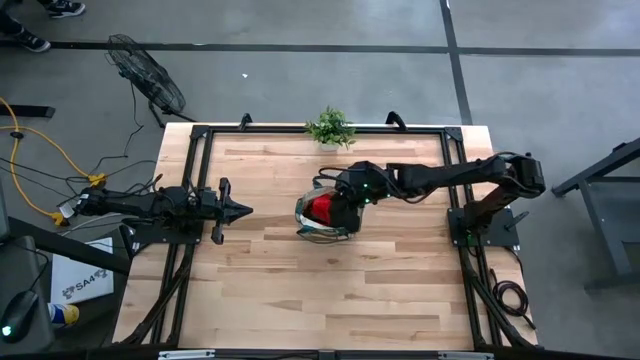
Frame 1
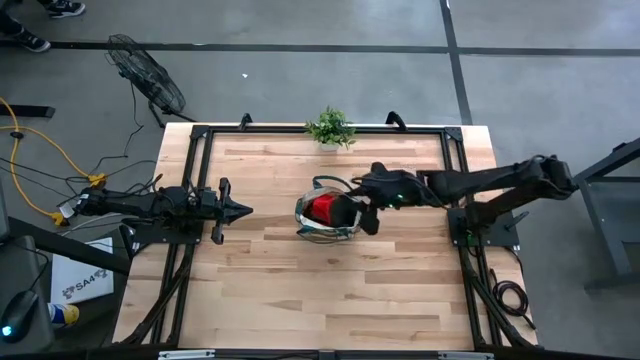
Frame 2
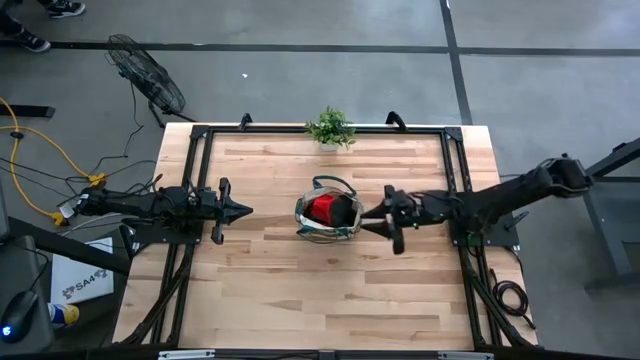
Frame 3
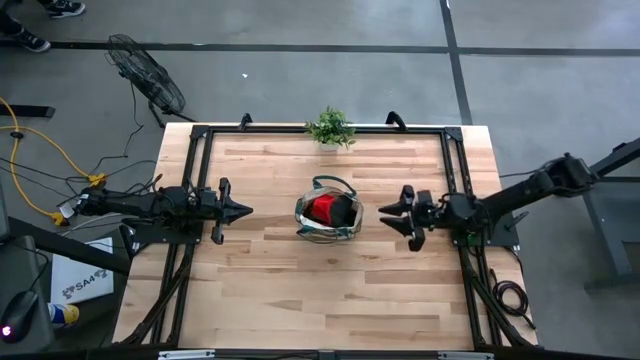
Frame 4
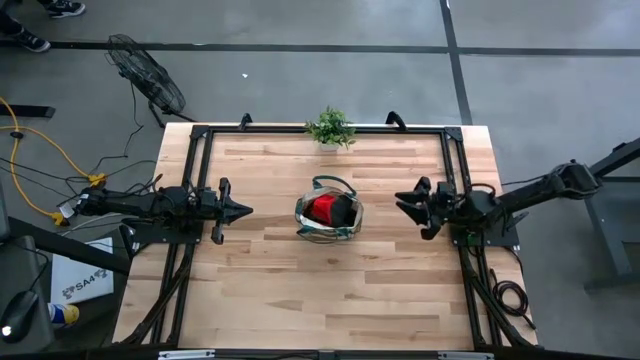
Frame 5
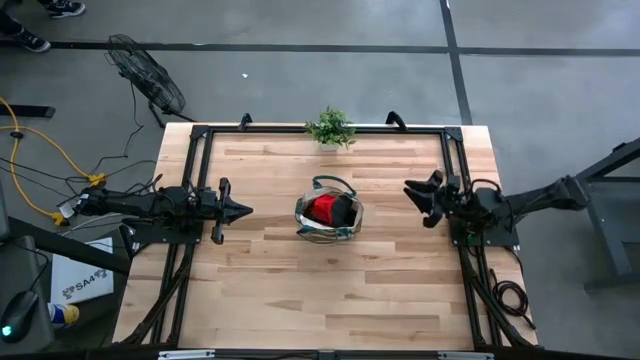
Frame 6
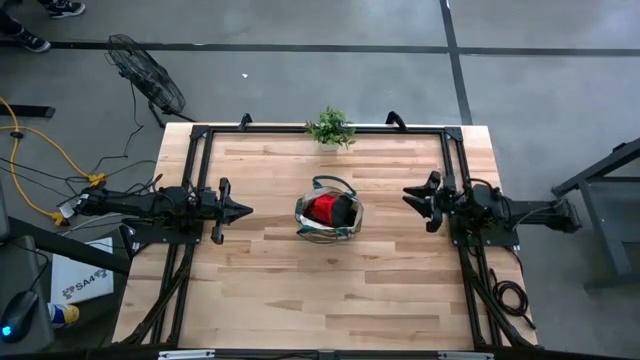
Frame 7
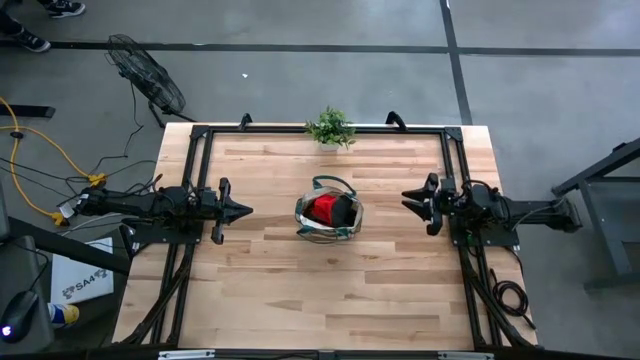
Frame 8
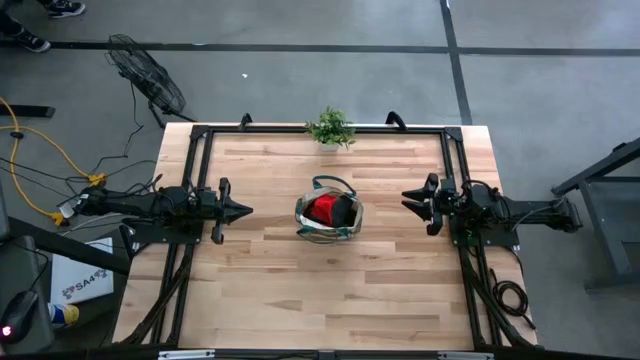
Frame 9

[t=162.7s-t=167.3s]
Task: Pick & Place Garden tools in Gardening bag
Return to Home Position

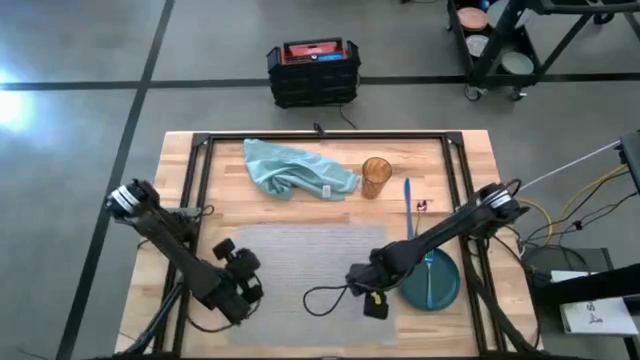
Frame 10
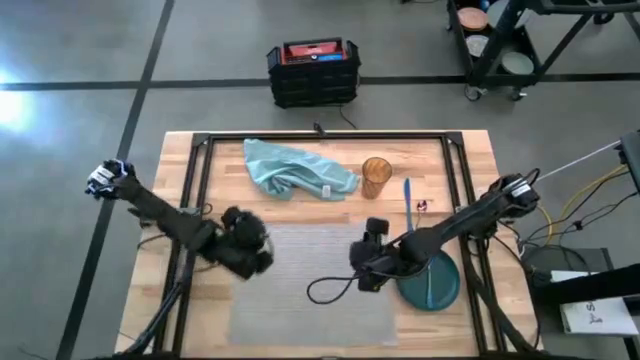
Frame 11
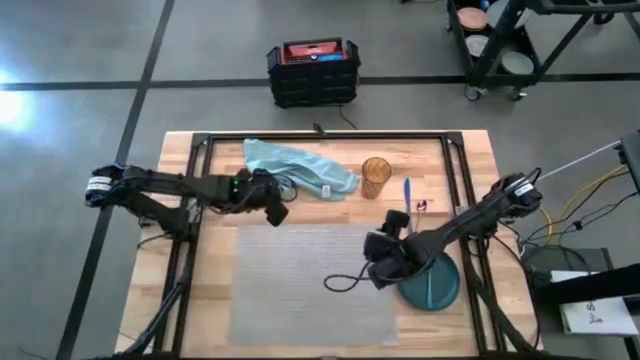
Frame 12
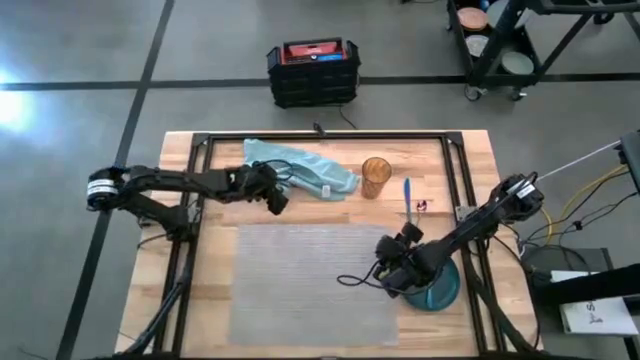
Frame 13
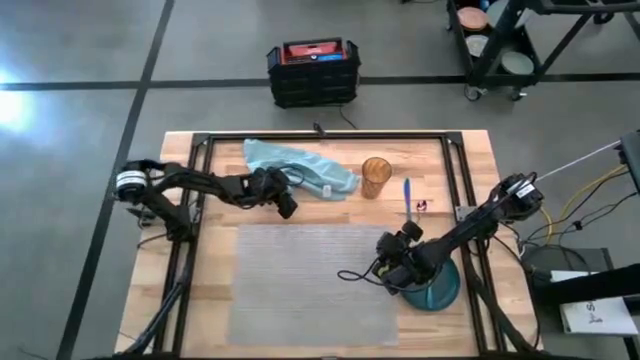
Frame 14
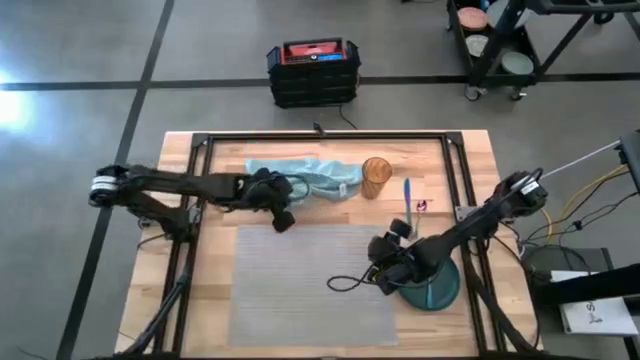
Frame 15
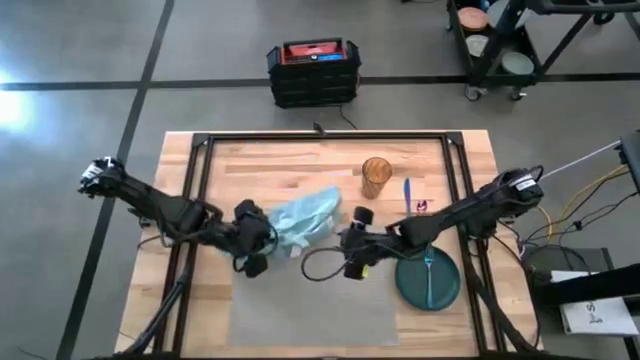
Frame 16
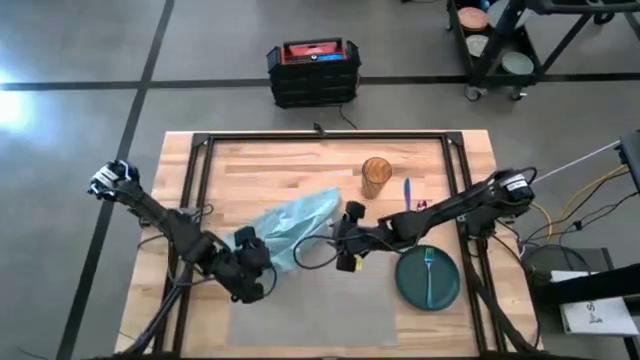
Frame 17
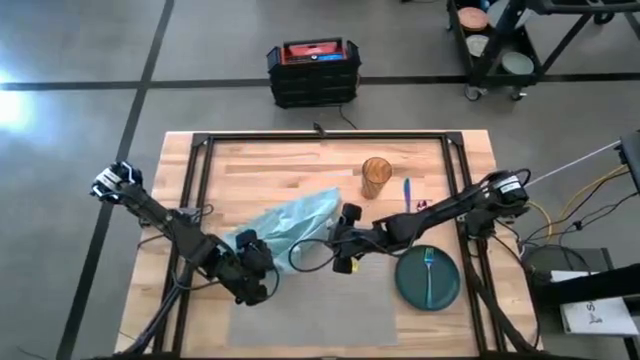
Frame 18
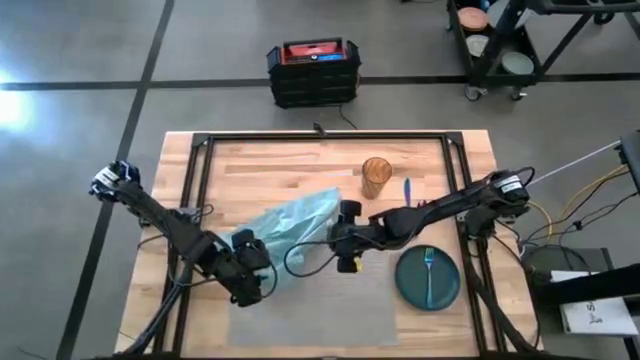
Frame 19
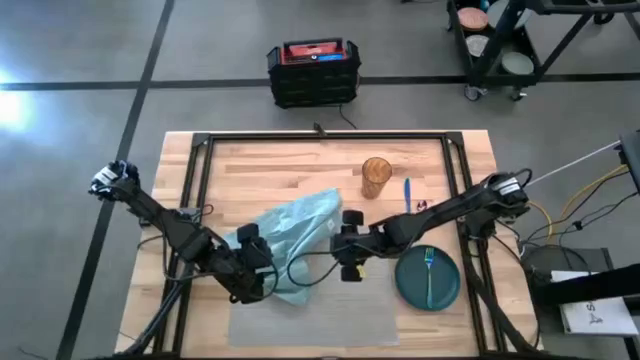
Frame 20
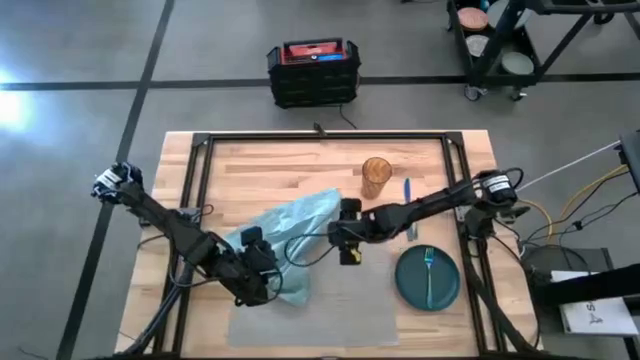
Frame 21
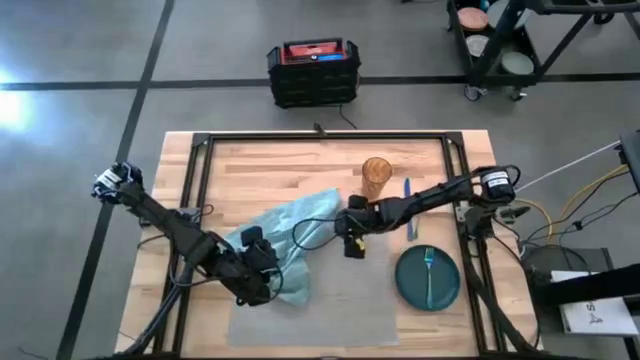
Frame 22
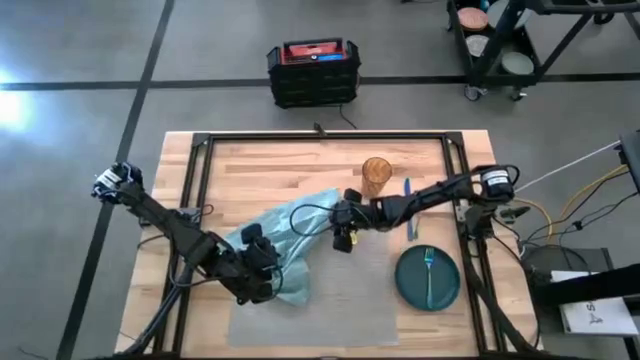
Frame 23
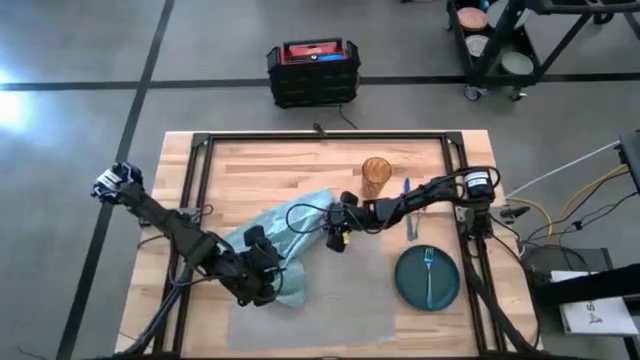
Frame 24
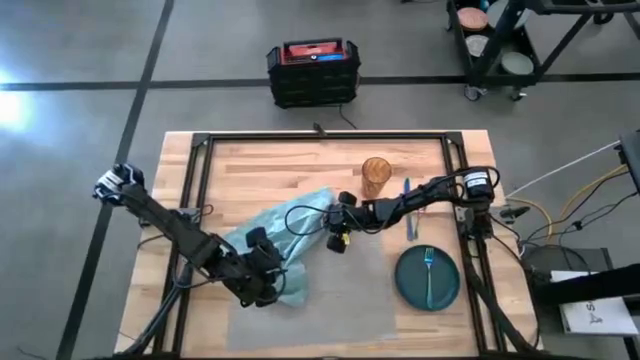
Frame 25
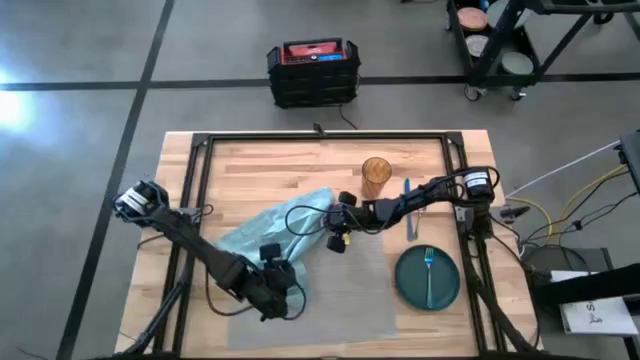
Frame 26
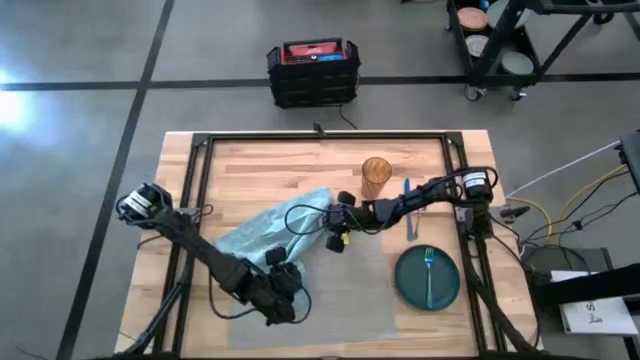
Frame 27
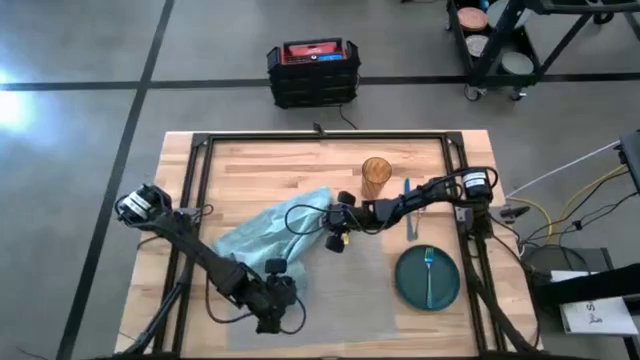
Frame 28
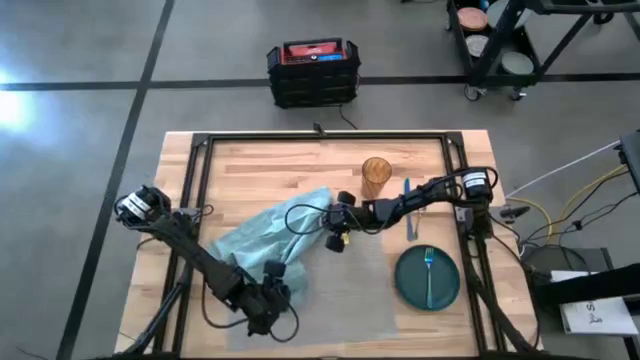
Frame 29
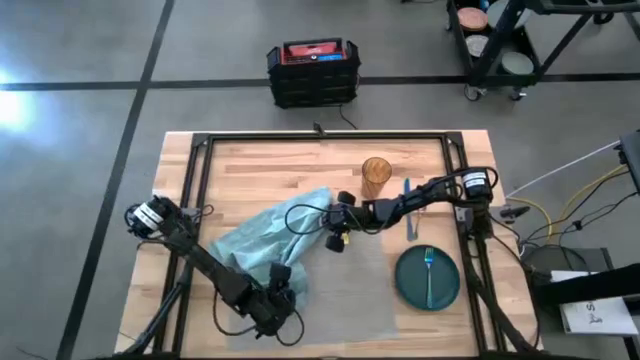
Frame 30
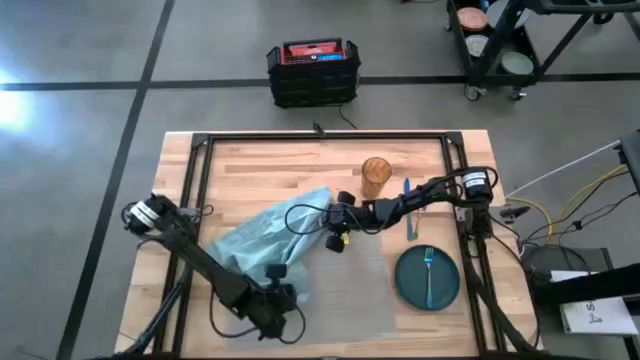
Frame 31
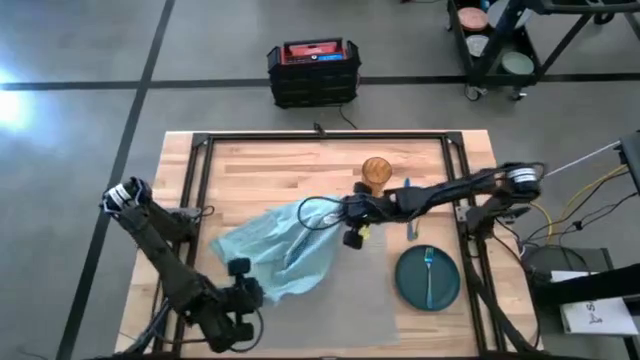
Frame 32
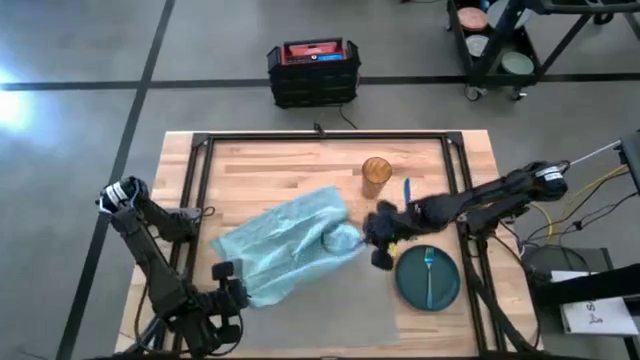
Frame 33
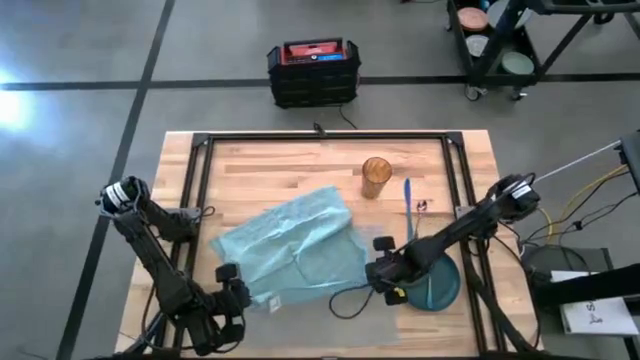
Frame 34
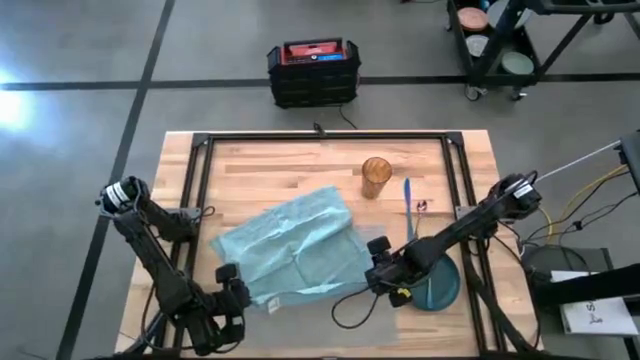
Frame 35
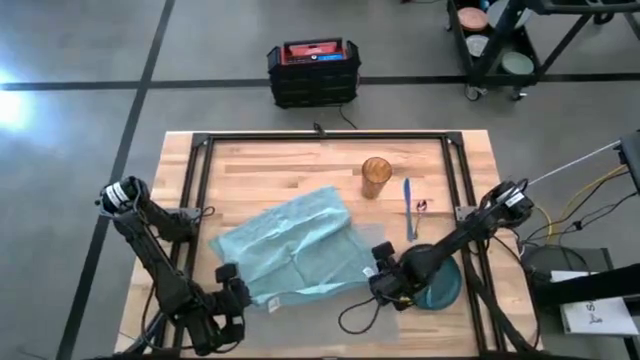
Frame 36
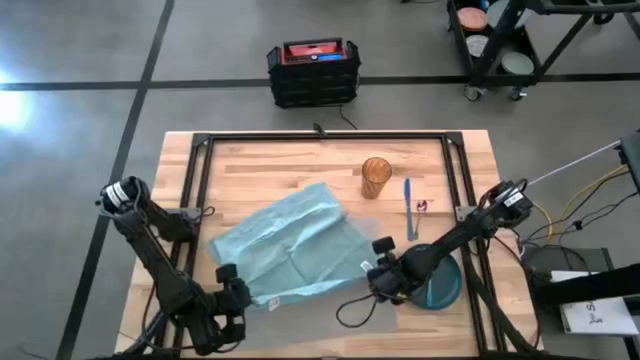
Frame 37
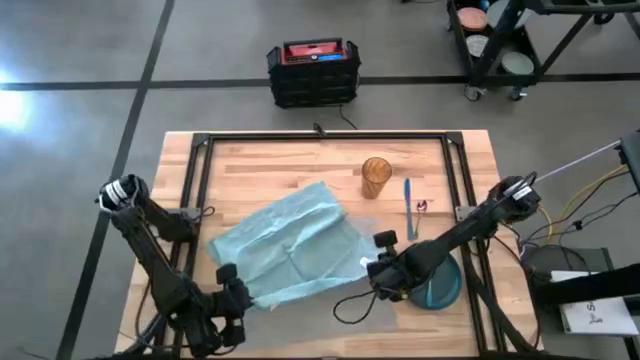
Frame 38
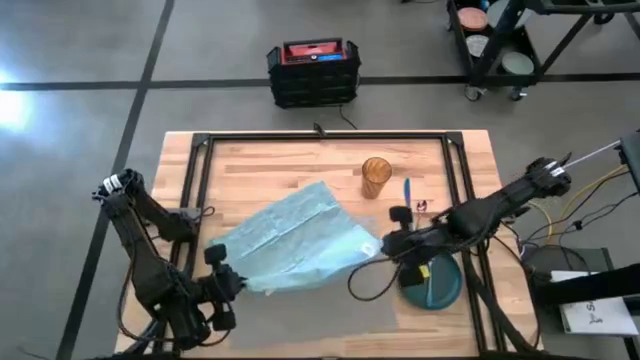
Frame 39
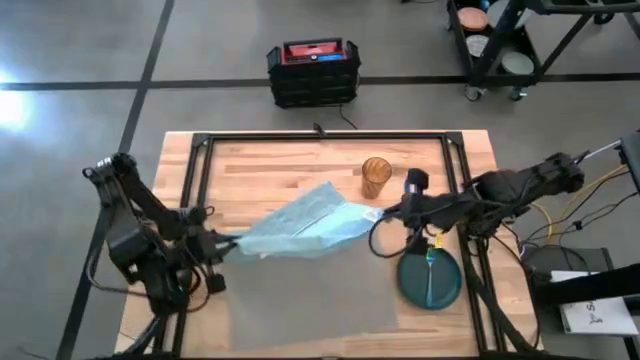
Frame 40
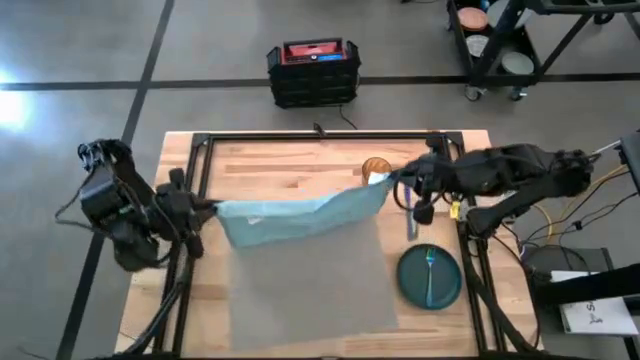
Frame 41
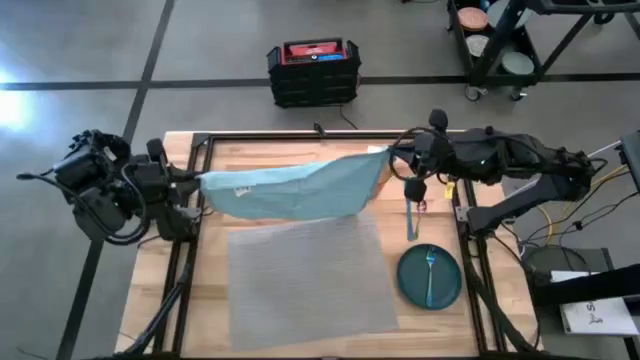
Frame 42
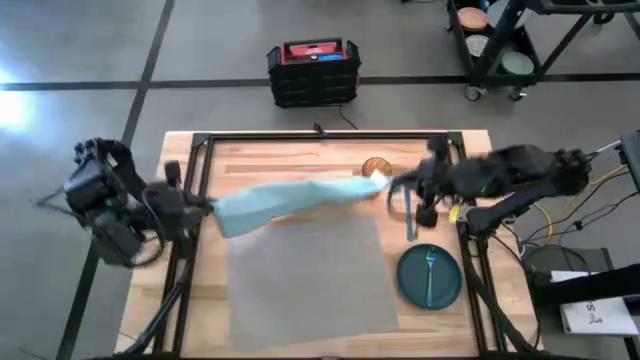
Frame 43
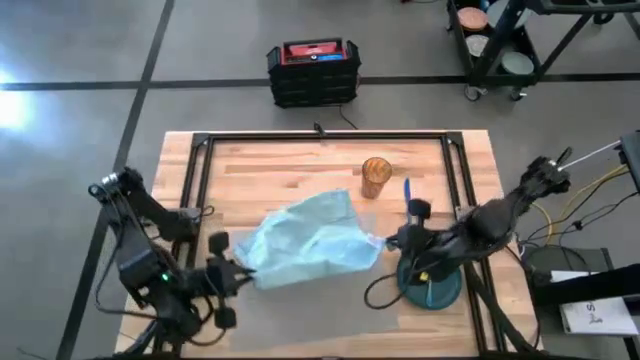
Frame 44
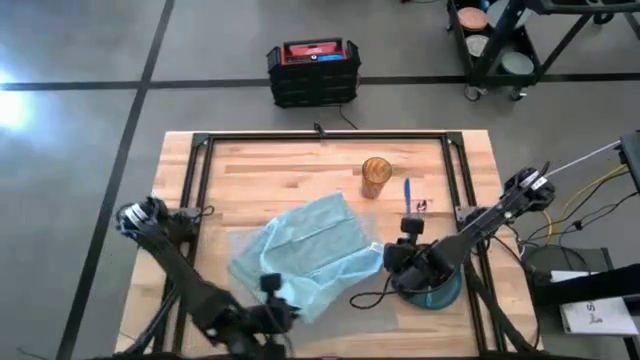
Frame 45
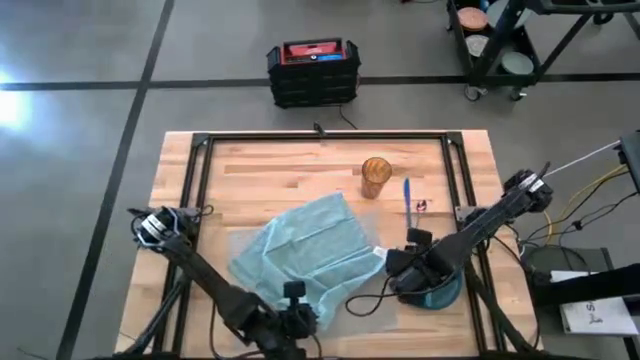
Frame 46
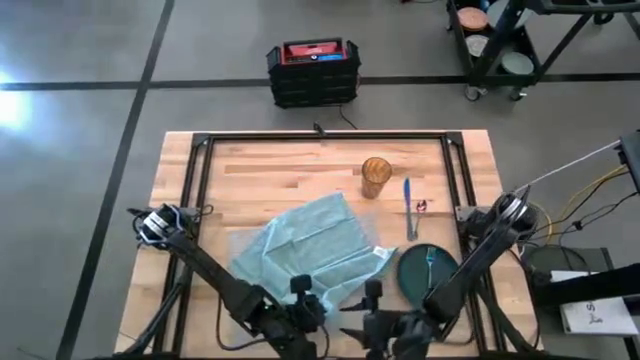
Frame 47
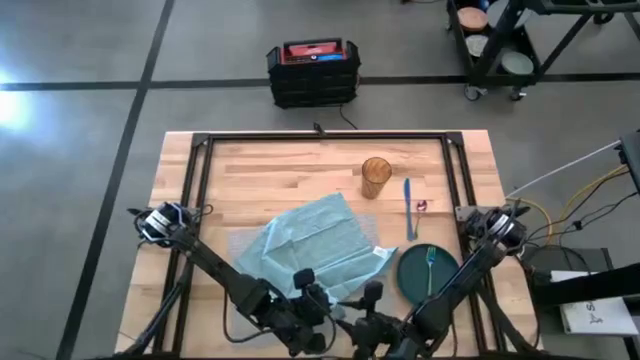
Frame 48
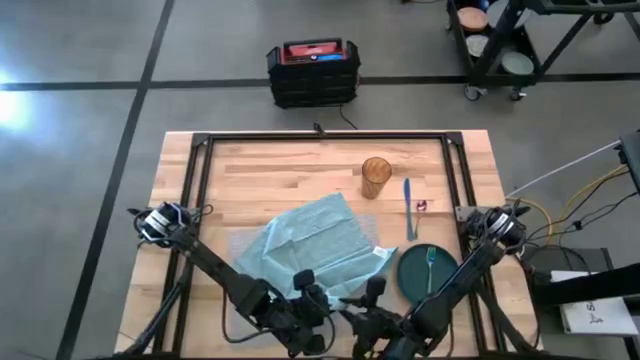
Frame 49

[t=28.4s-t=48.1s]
Task: Set table place
Fold the blue table napkin
